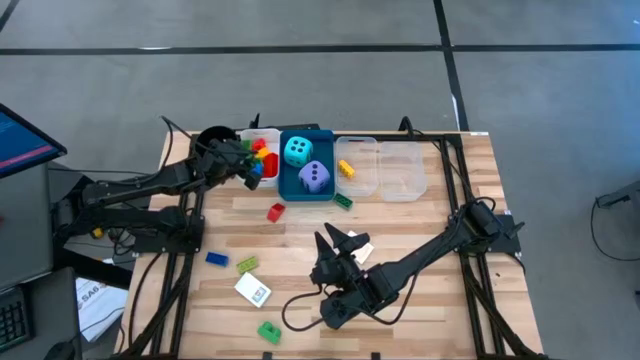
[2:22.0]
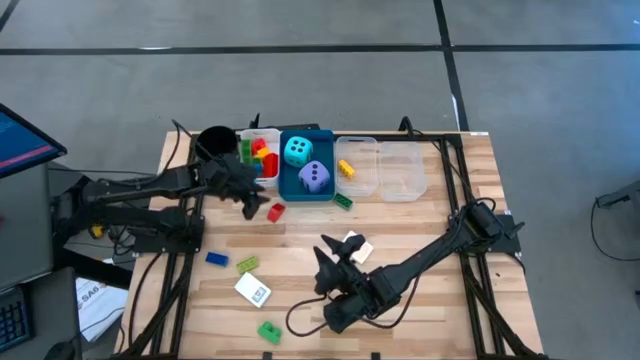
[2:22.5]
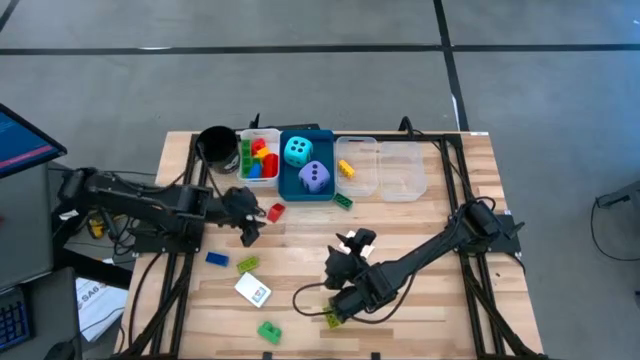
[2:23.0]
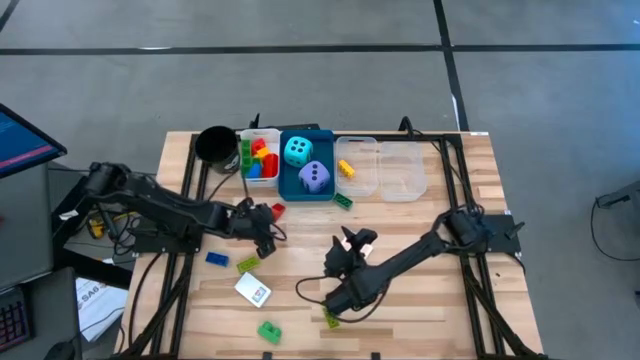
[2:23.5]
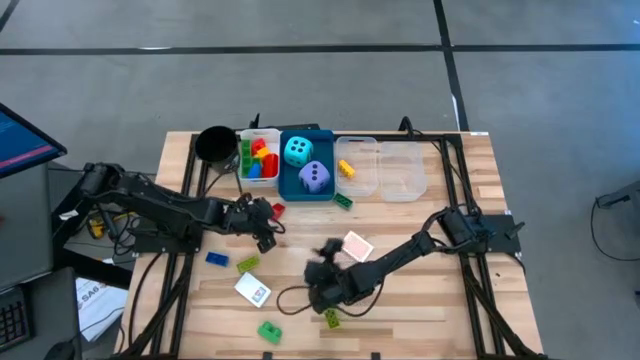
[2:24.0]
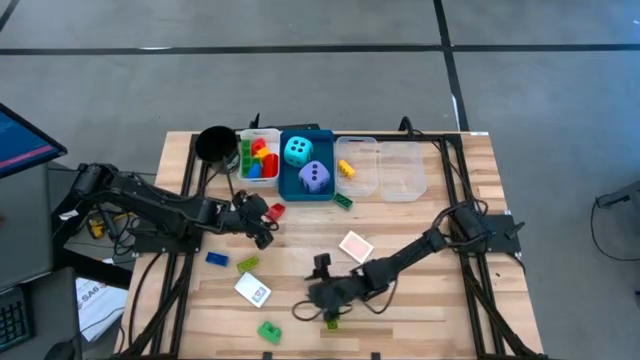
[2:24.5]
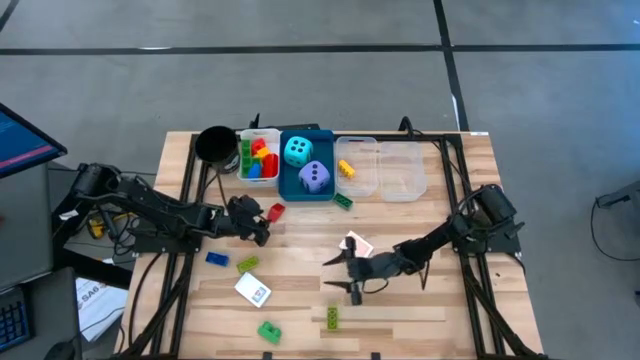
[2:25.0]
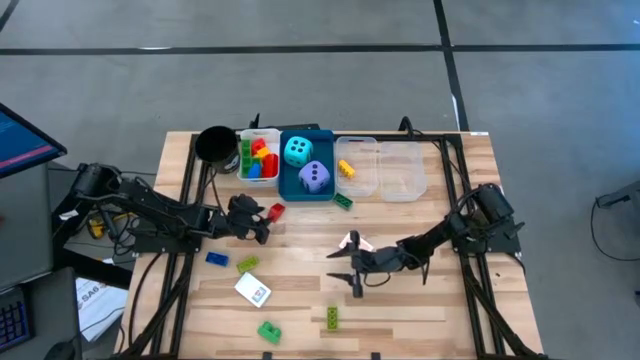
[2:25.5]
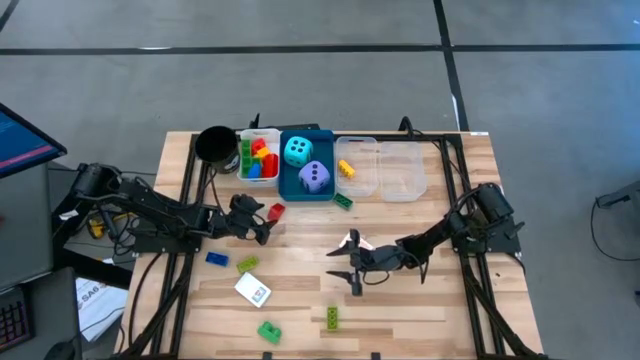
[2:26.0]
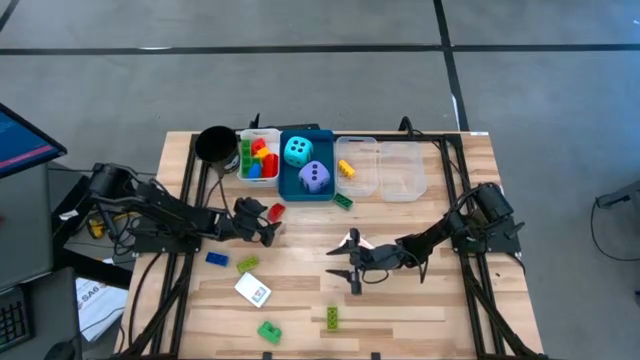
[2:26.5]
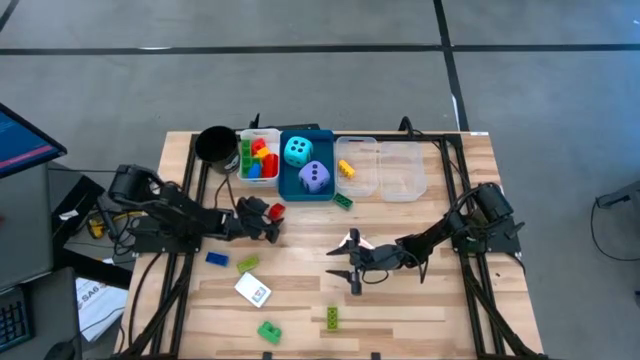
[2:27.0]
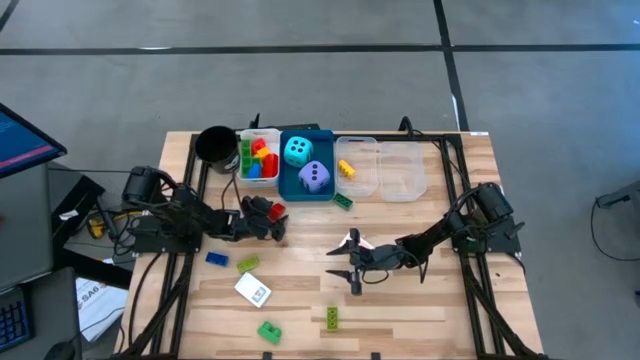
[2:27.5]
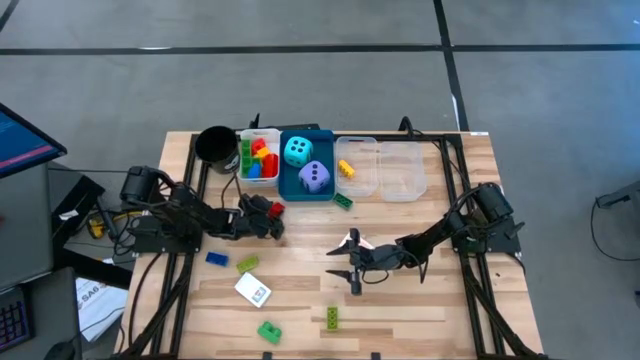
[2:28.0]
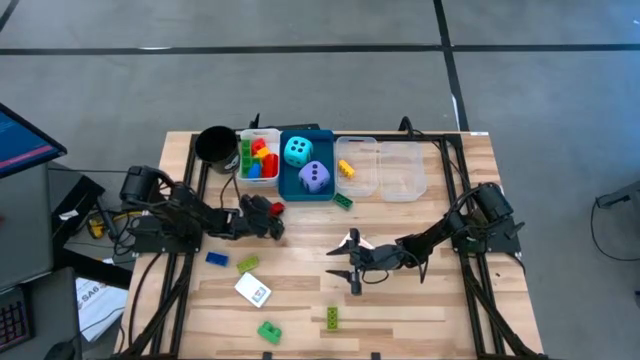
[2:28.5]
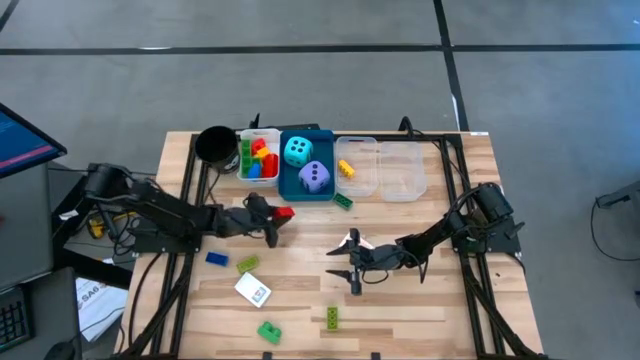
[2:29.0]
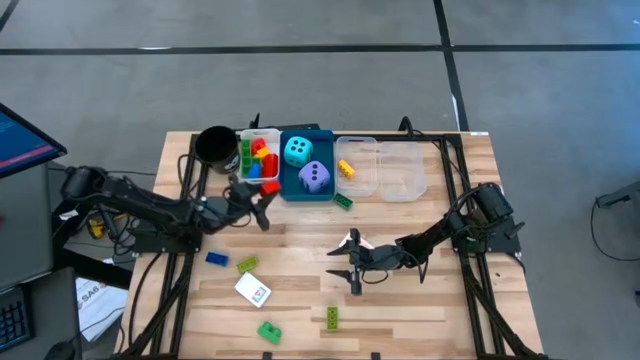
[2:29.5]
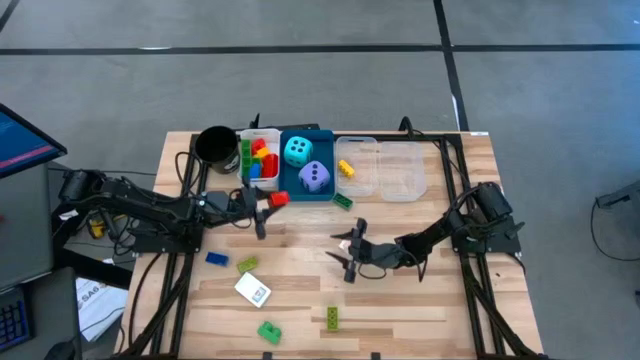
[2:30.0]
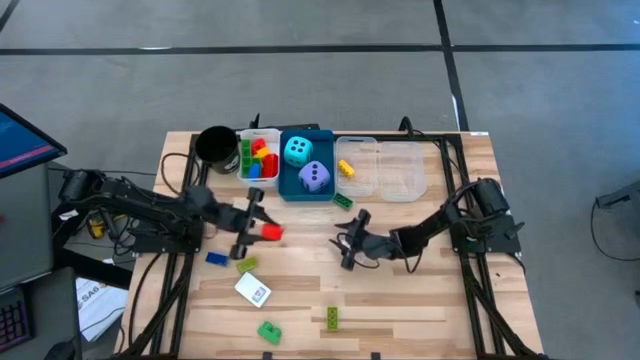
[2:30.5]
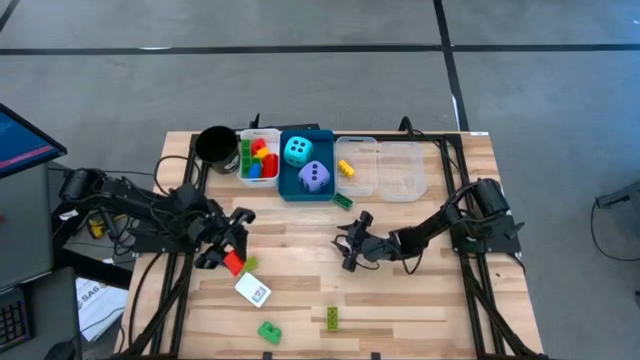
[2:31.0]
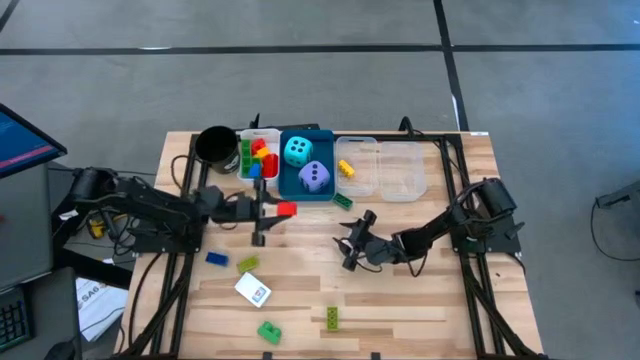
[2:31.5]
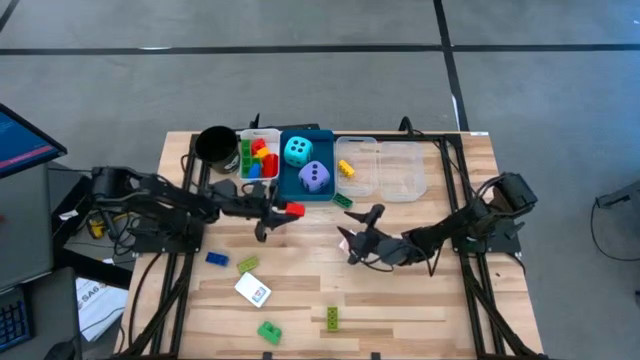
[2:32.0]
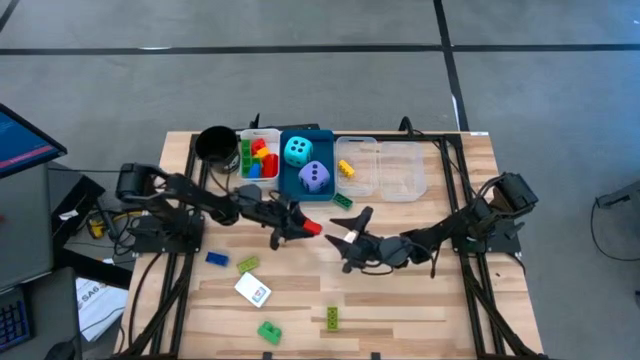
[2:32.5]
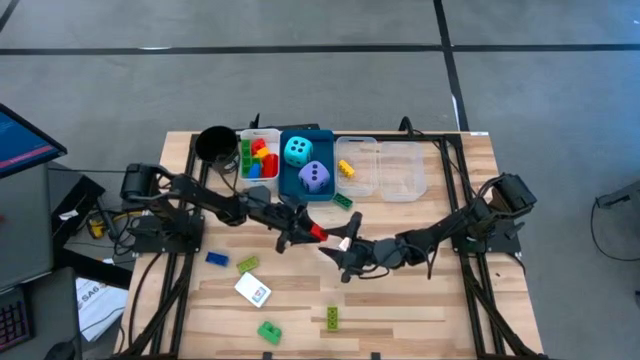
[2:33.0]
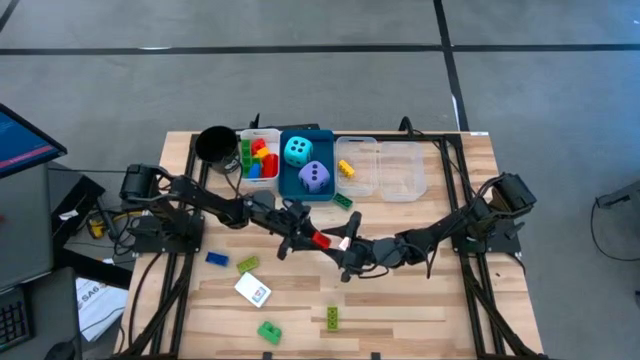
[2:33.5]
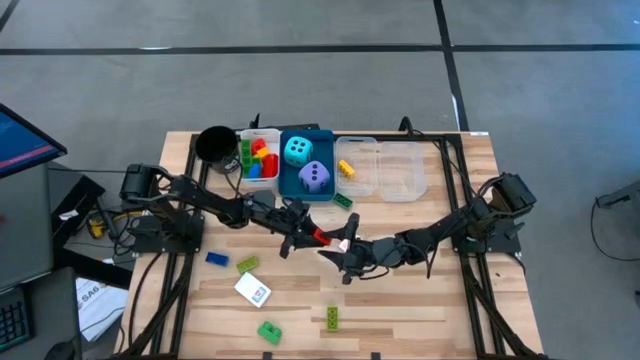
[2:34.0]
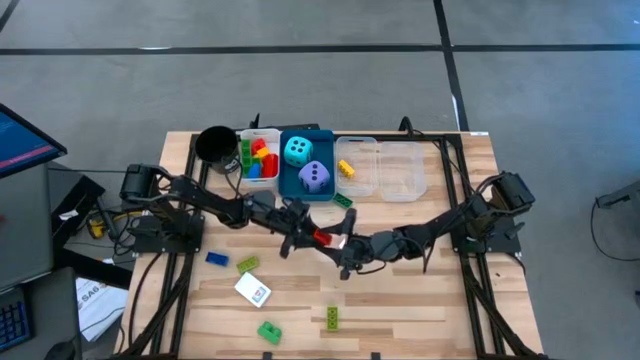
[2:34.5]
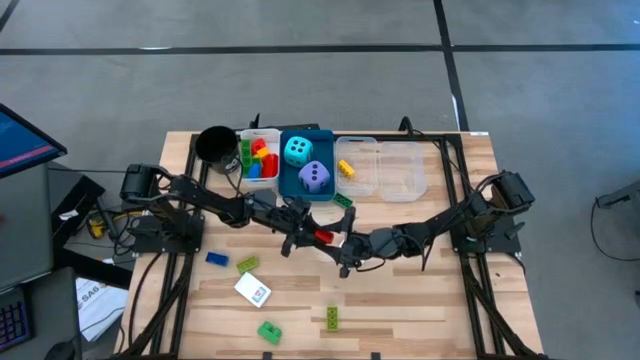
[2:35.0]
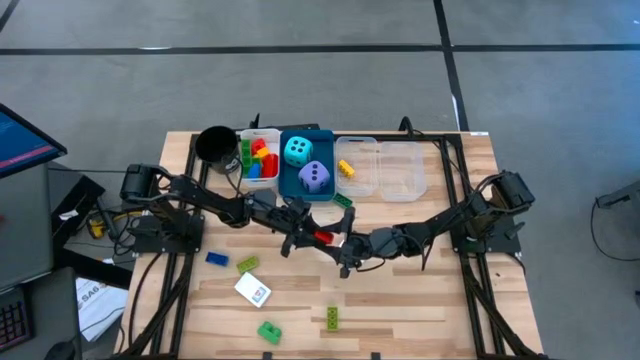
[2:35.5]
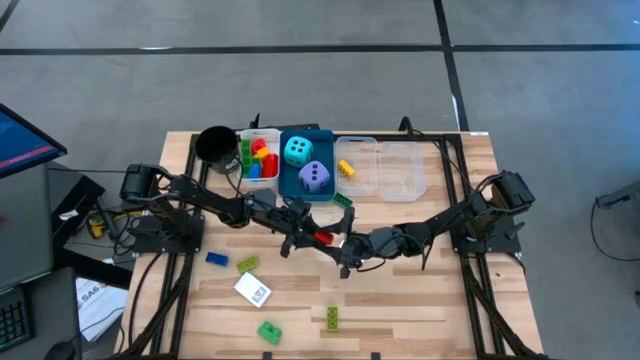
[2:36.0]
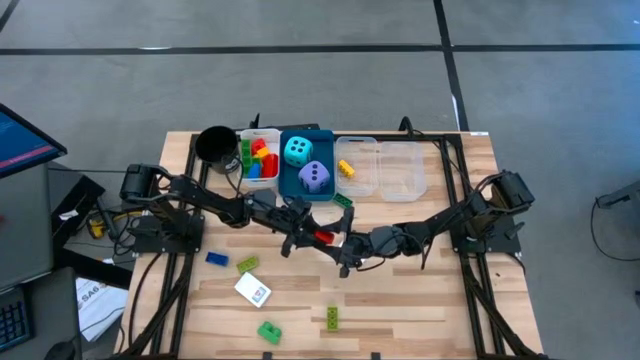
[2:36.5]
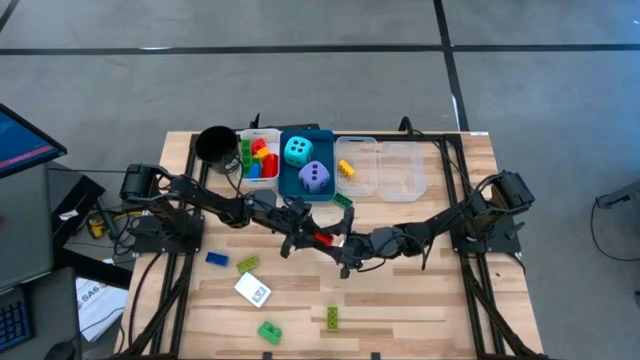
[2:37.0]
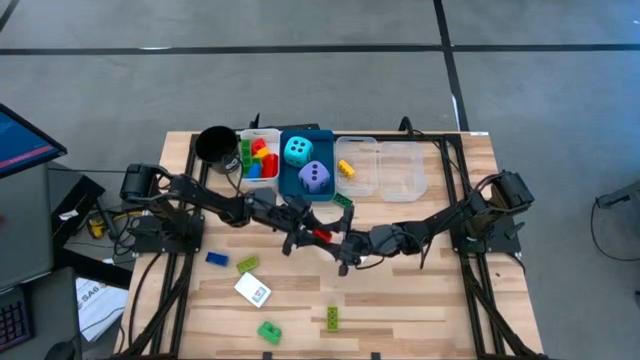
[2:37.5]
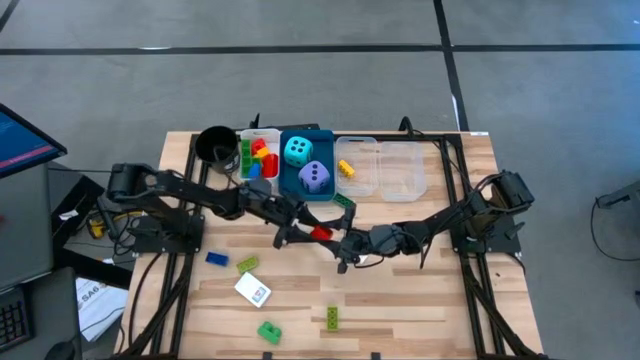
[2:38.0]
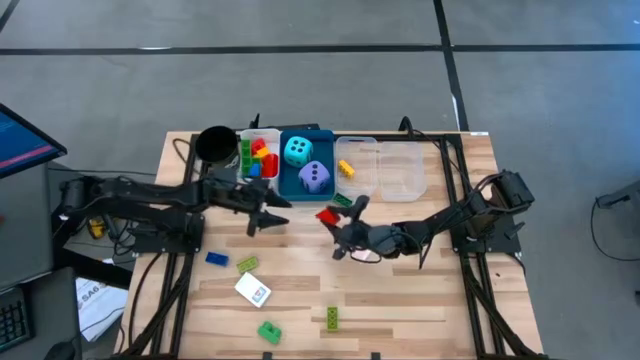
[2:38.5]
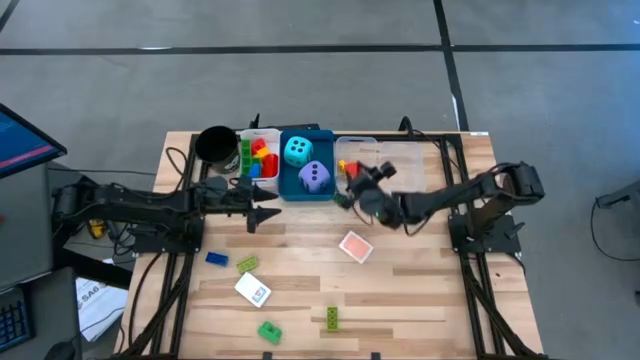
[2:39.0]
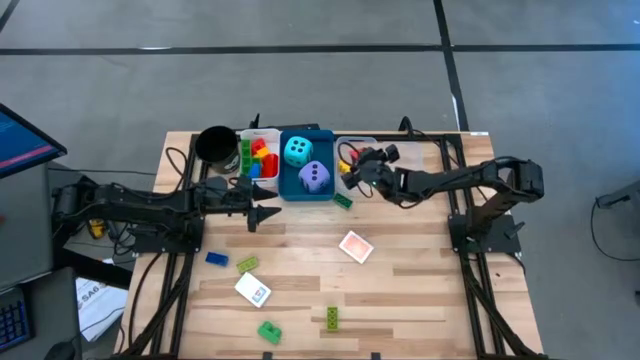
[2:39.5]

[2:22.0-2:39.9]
Task: Pick & Place Toys
Put the small red game piece into the left transparent bin

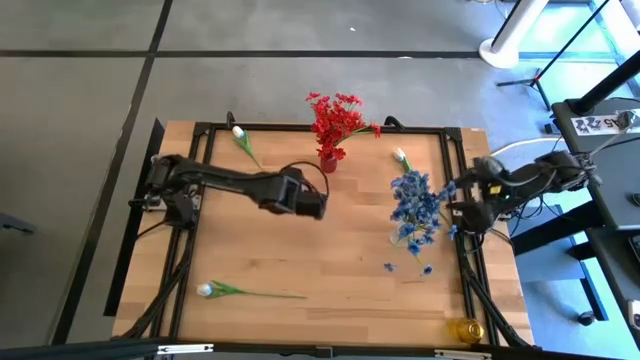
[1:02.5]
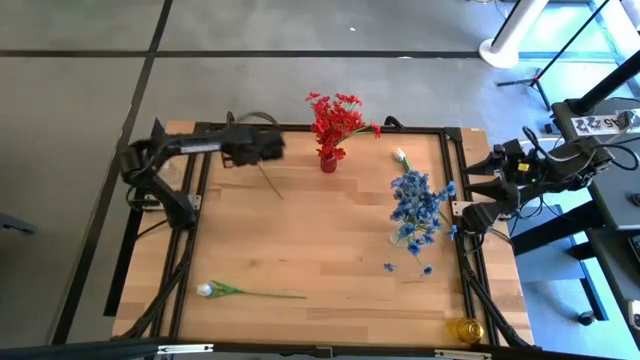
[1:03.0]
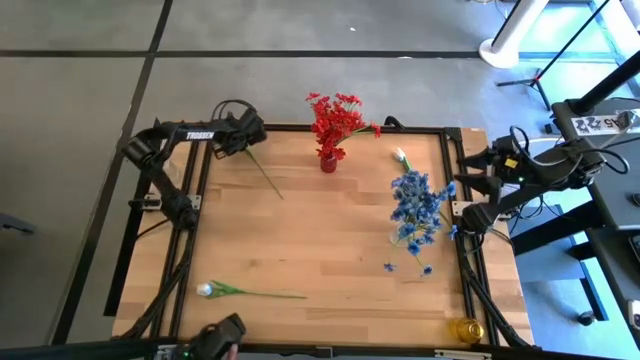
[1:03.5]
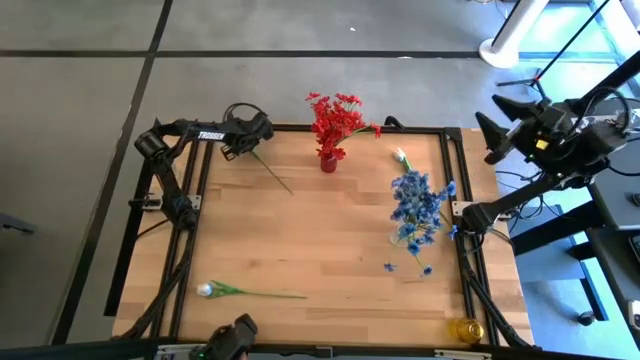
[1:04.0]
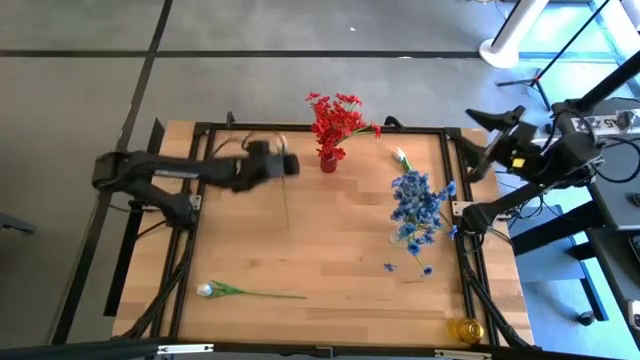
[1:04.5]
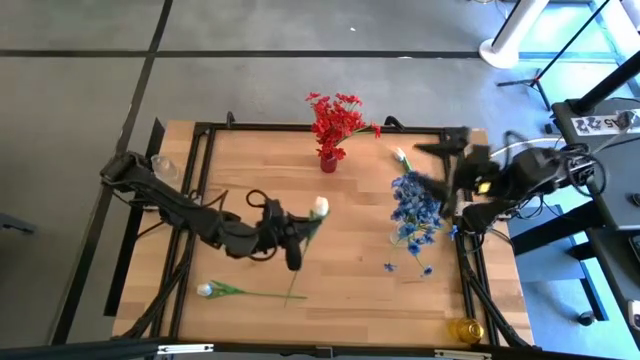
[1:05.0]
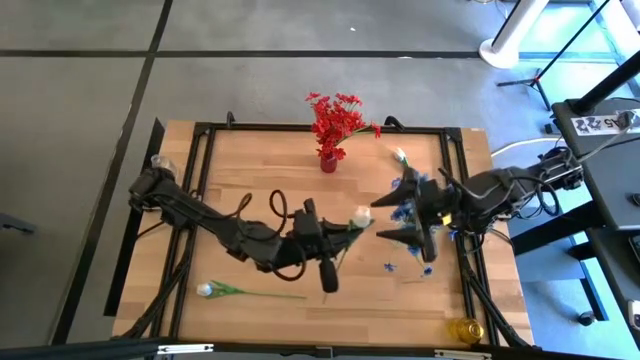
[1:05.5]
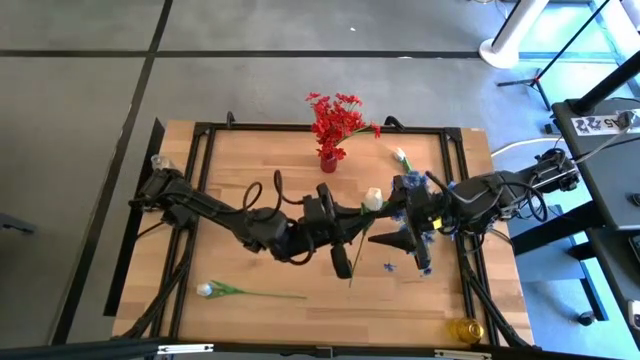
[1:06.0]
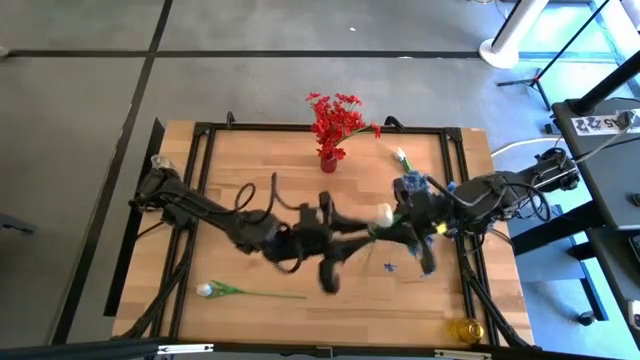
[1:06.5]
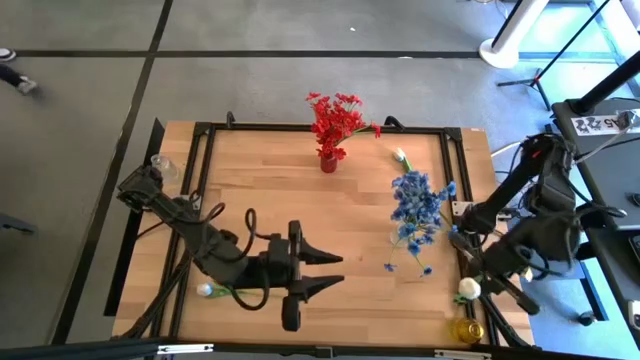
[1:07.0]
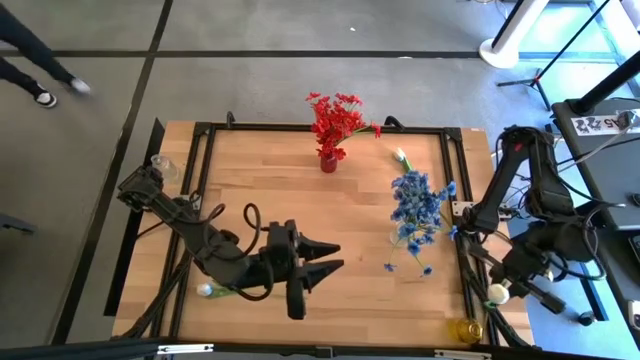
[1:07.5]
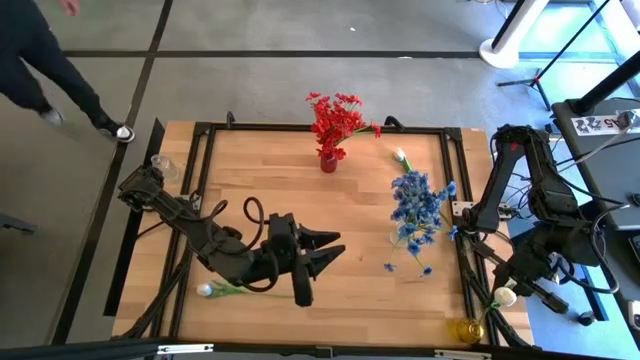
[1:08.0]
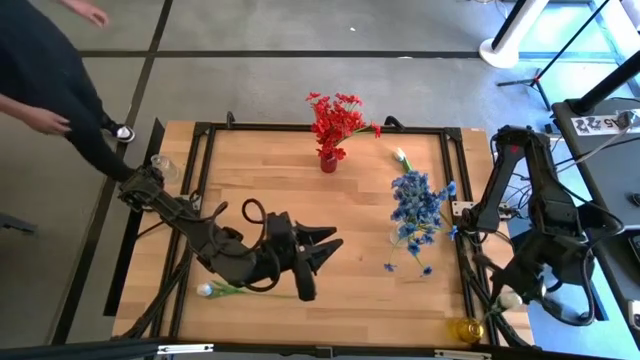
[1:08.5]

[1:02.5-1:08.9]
Task: Sort flowers into vase by color
Put the top left white flower into the yellow vase
